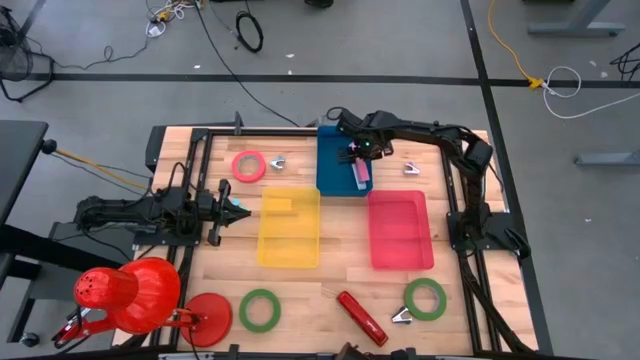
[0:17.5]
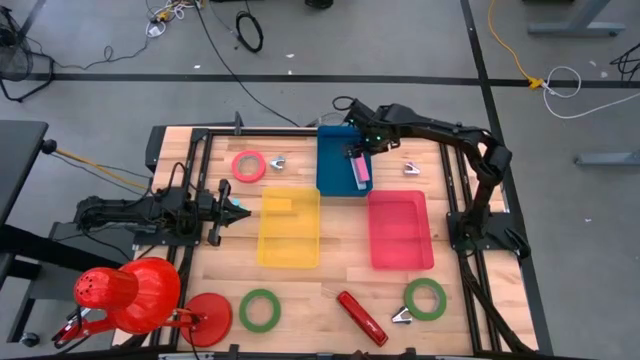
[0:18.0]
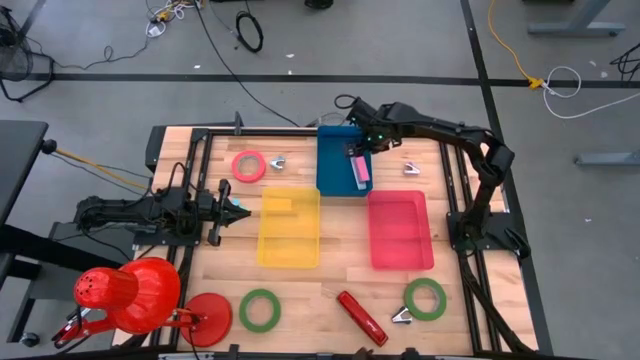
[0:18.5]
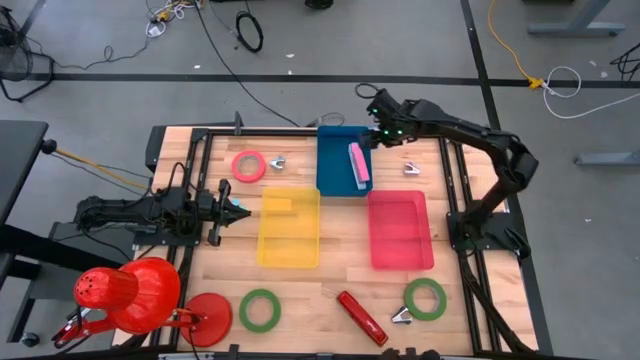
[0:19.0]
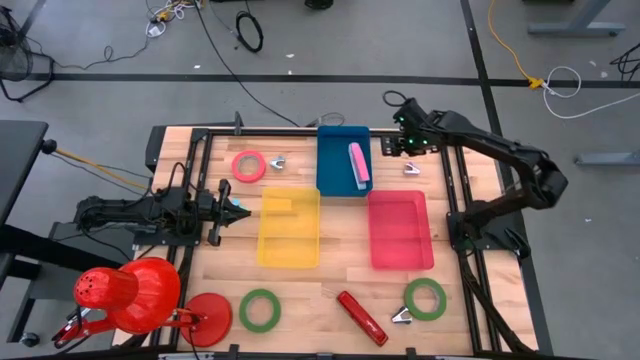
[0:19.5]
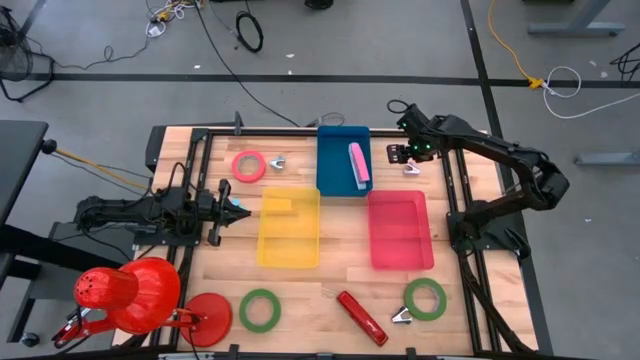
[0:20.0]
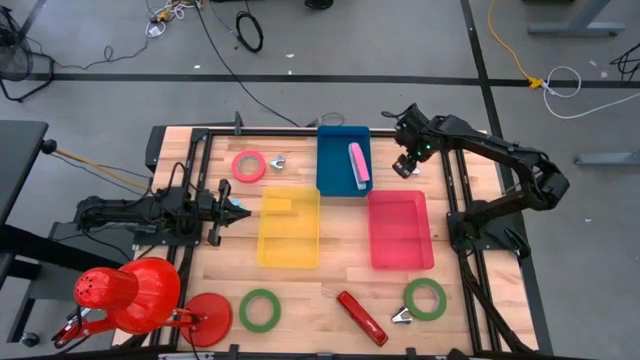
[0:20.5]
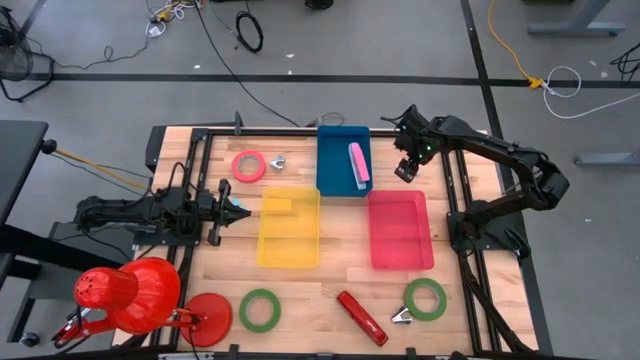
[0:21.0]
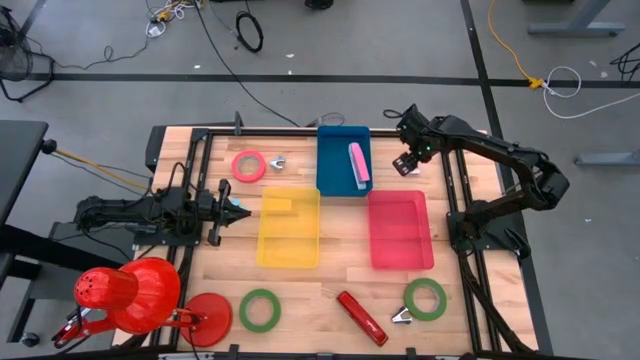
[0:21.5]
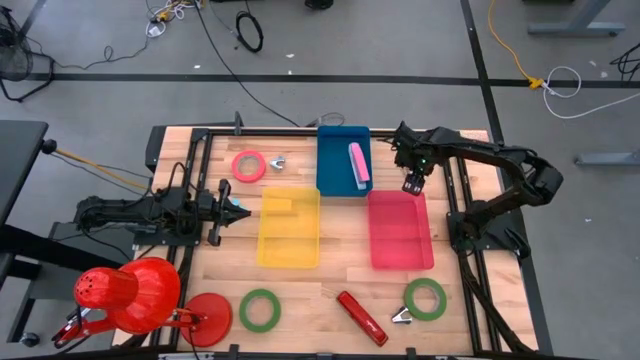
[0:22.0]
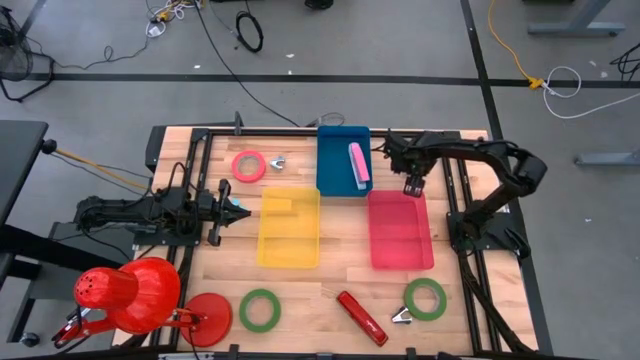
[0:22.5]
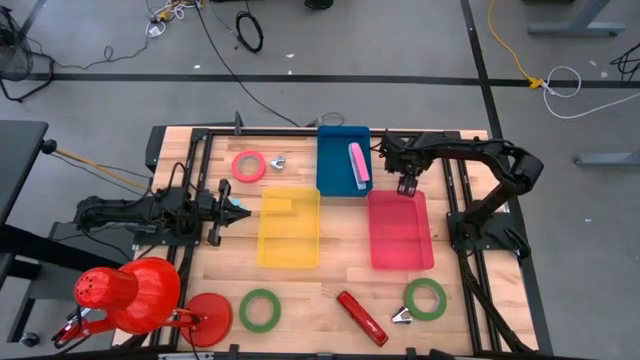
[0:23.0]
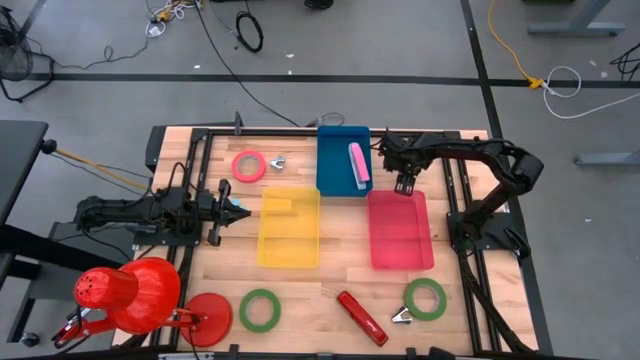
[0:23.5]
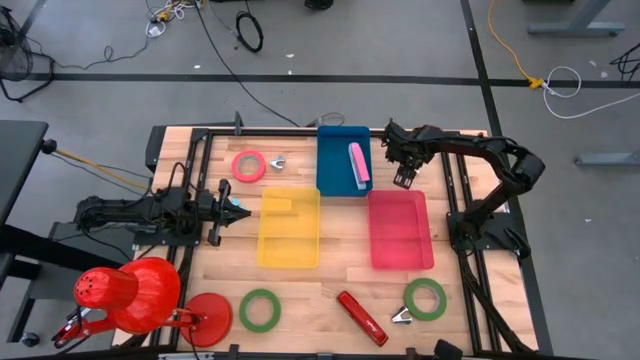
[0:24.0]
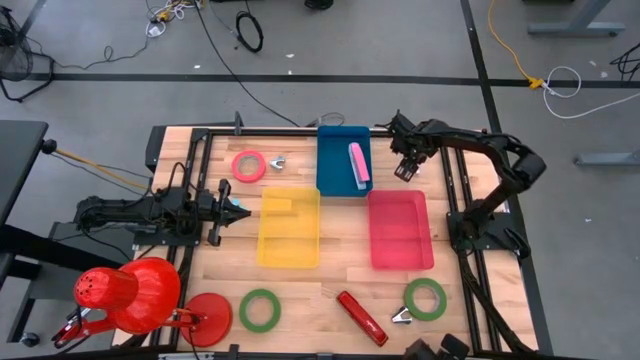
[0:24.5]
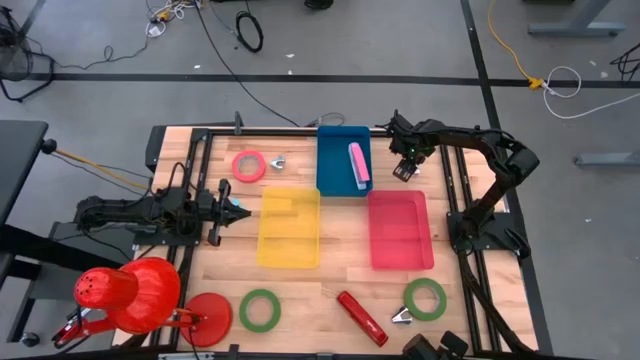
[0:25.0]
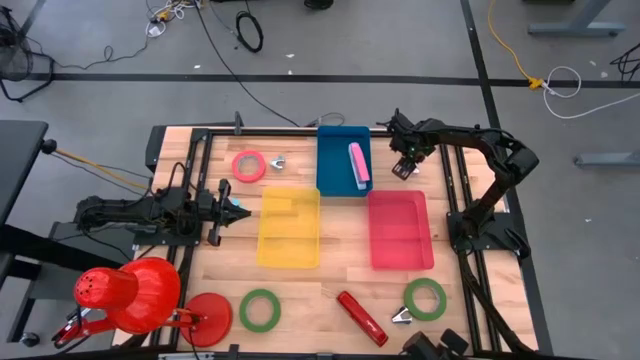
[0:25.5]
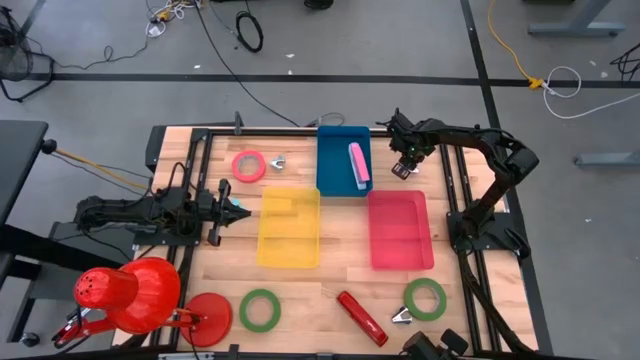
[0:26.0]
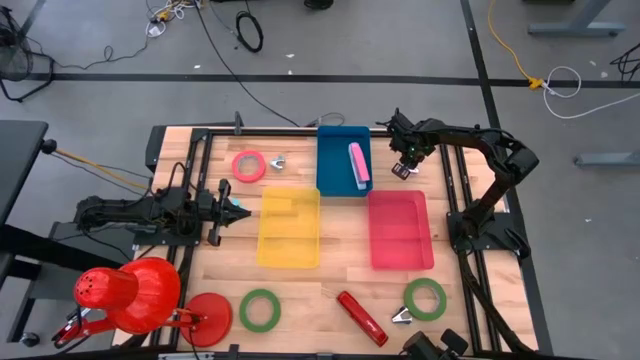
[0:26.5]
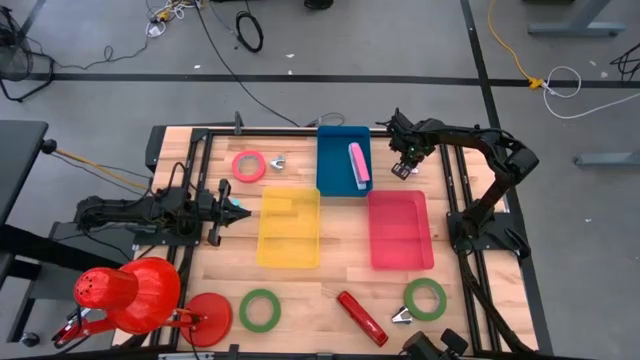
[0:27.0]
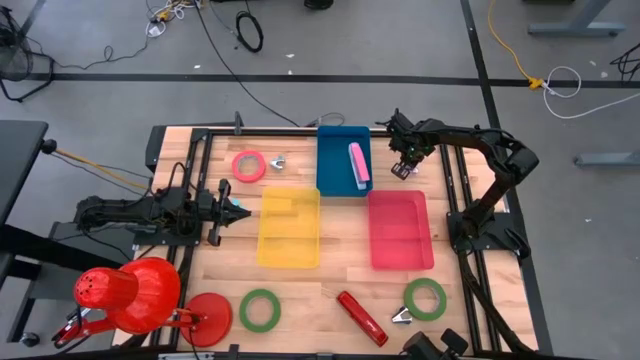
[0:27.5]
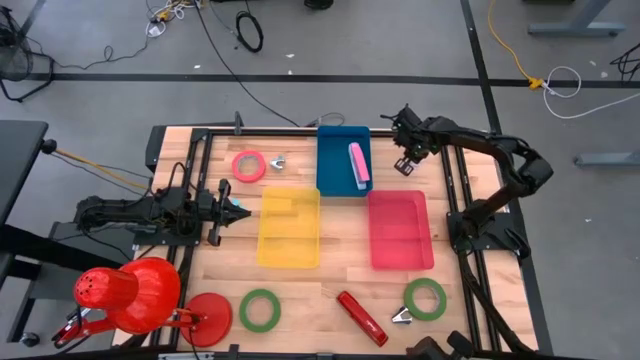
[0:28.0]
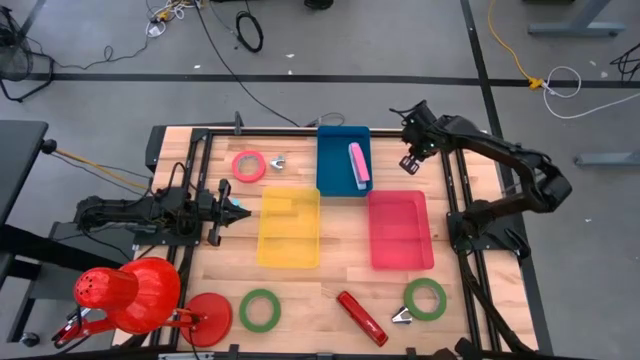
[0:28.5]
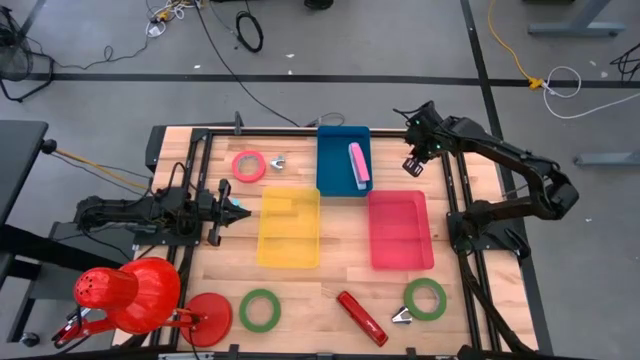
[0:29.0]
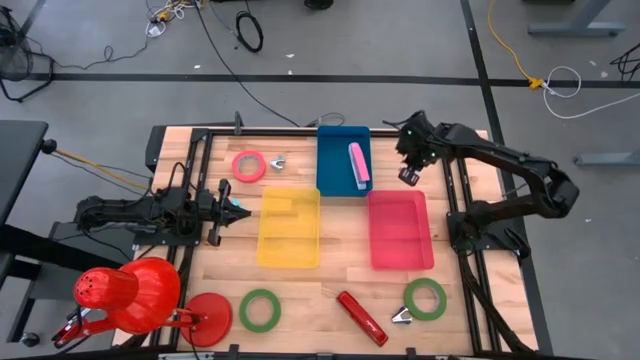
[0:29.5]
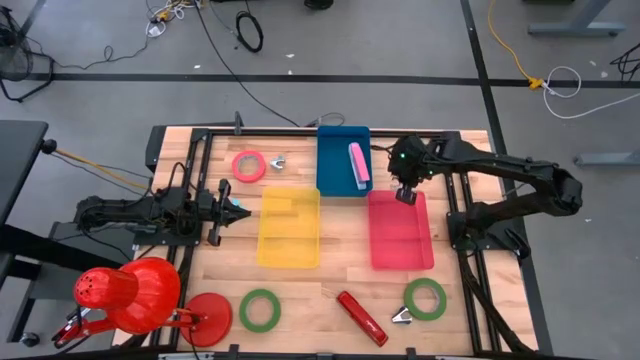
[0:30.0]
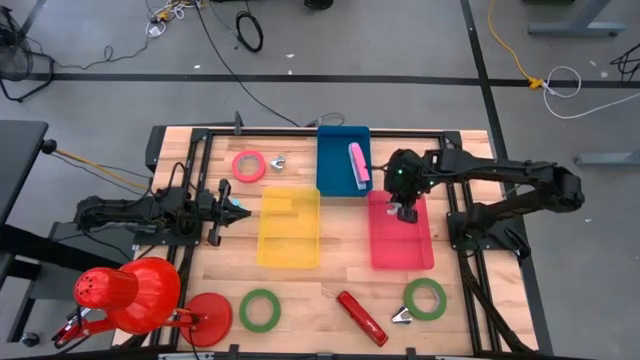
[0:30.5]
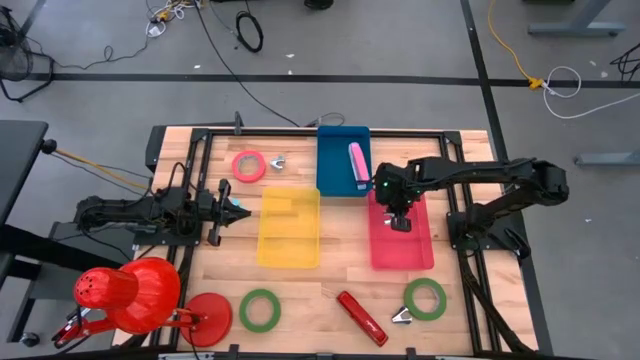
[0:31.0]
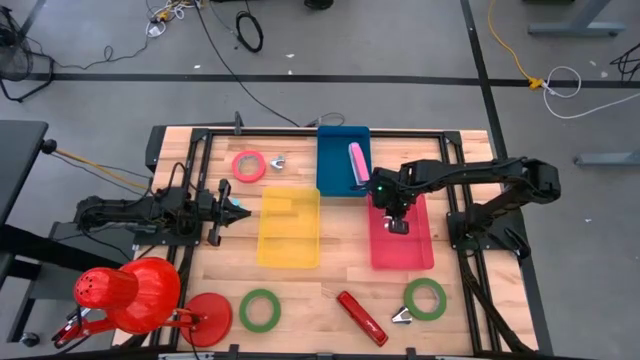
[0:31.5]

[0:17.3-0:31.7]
Task: Pick and place Stapler, Stapler remover, tape
Put the purple staple remover into the red bin

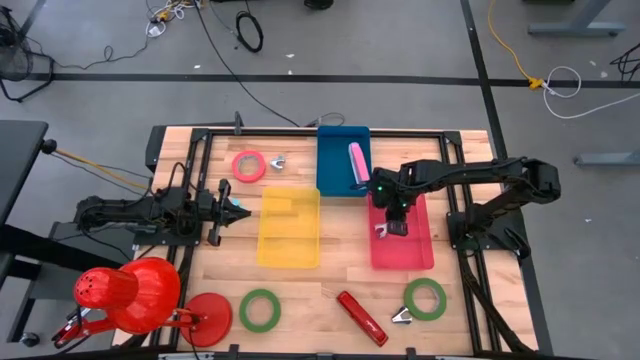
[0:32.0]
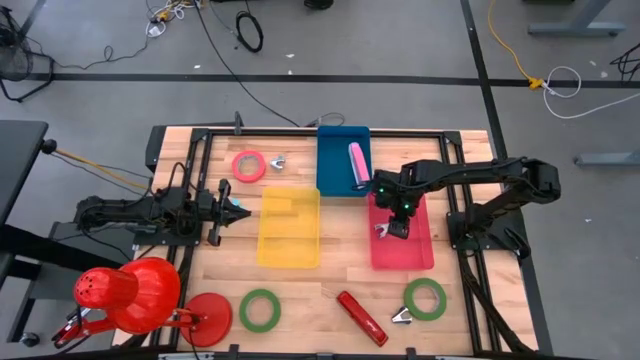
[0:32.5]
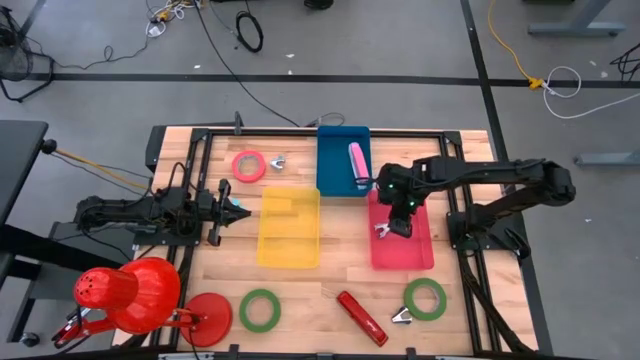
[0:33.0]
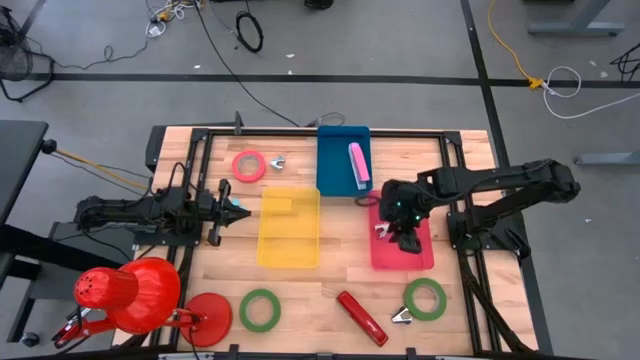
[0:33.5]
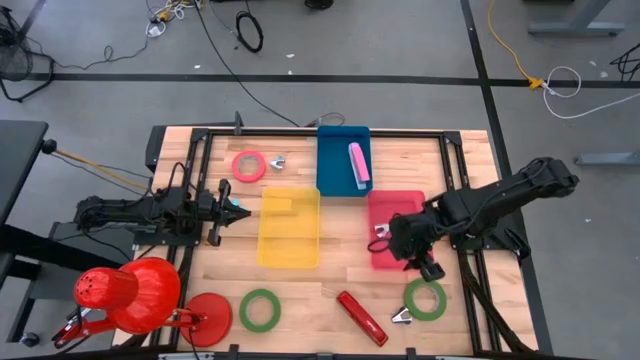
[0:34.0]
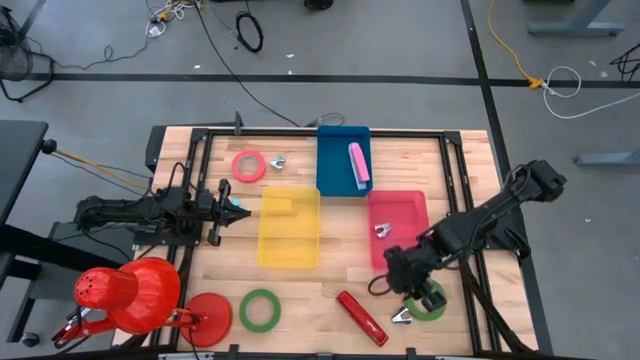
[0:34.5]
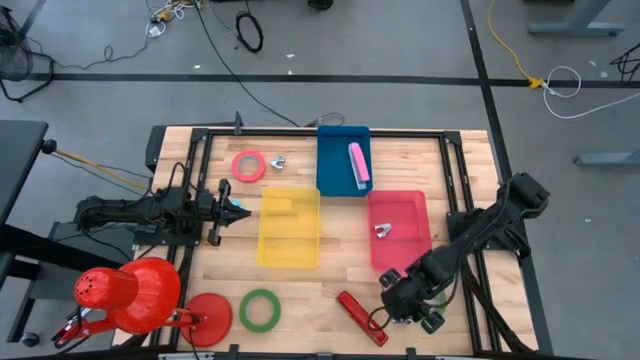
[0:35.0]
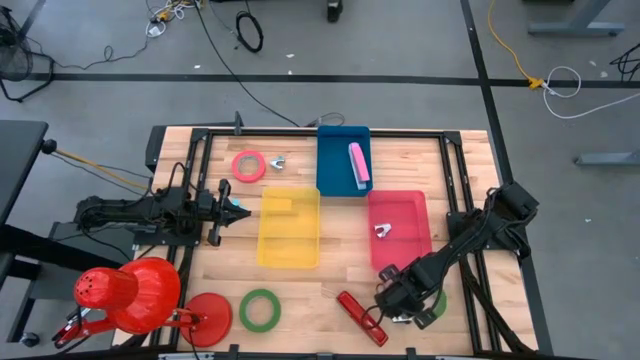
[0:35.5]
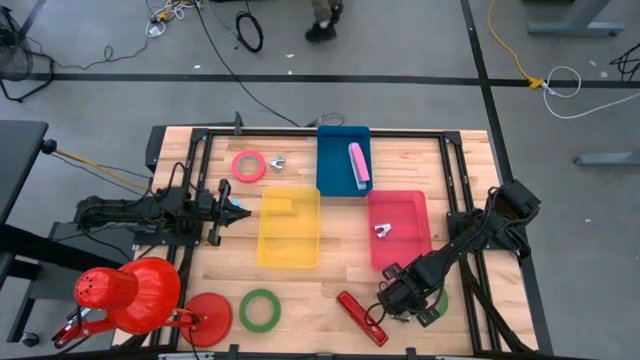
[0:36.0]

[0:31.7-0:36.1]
Put the black staple remover into the red bin

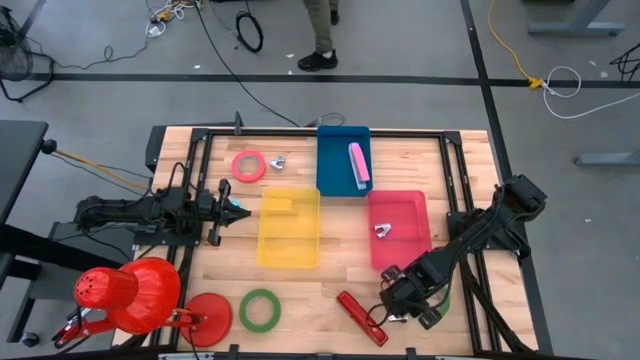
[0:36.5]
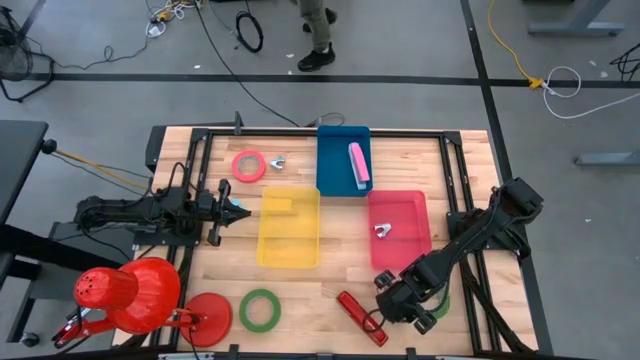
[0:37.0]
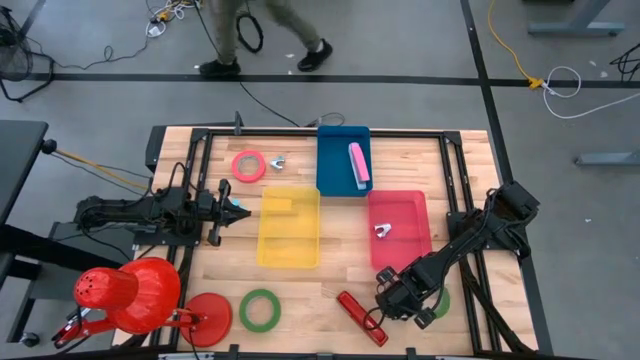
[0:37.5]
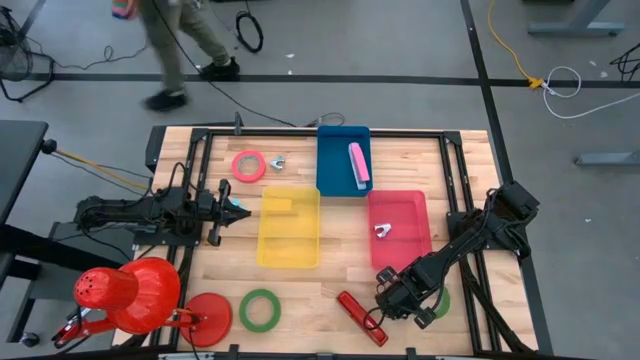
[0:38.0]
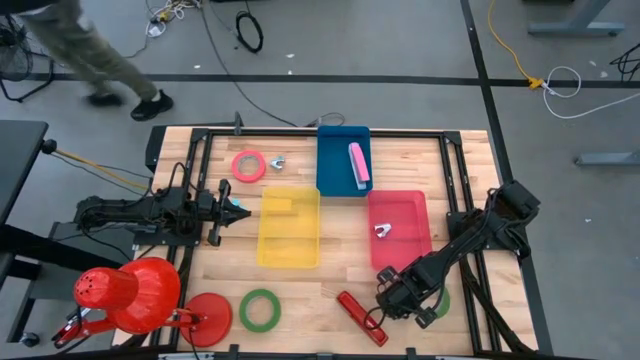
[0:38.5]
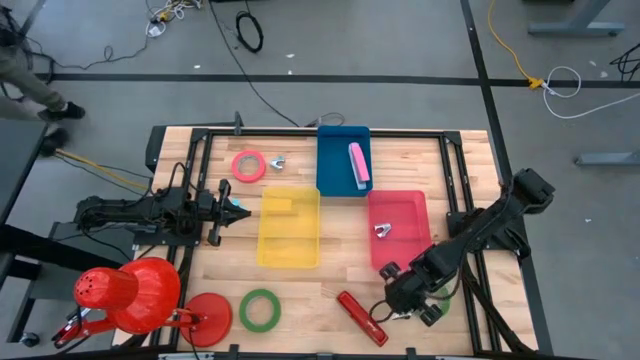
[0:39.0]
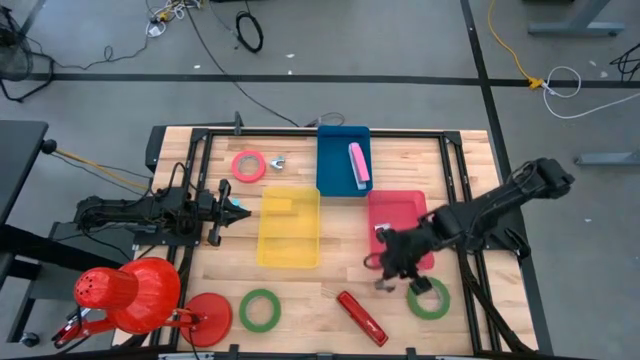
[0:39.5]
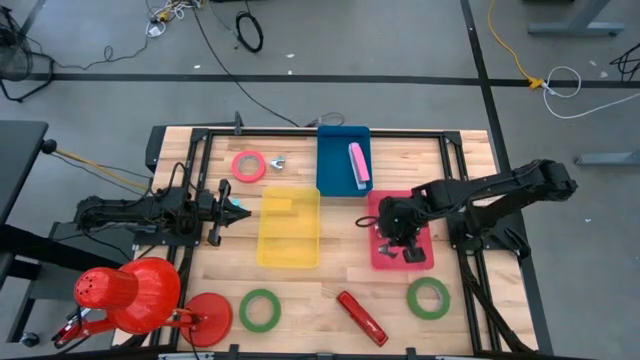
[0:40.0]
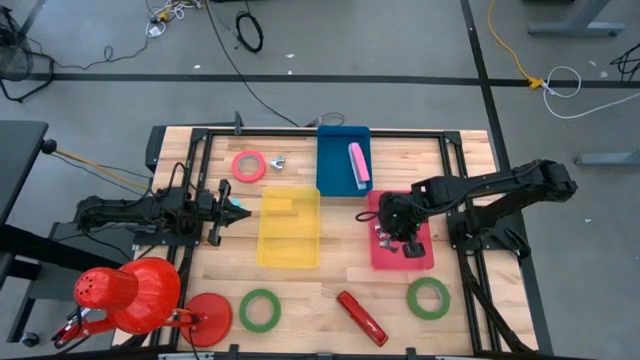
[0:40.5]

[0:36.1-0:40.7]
Put the black staple remover into the red bin
